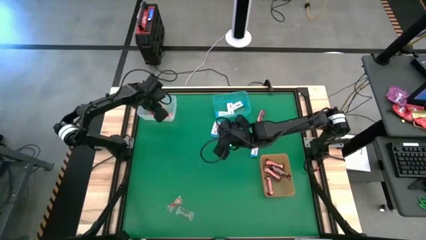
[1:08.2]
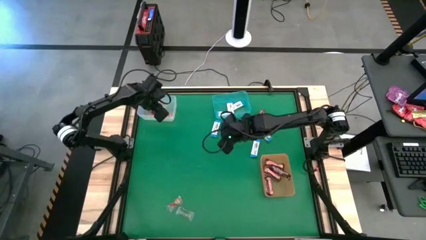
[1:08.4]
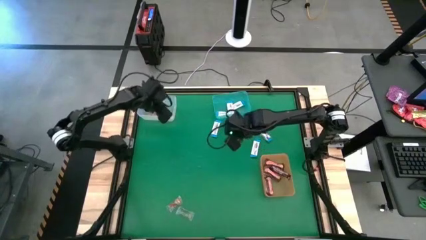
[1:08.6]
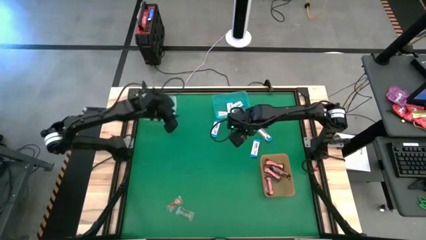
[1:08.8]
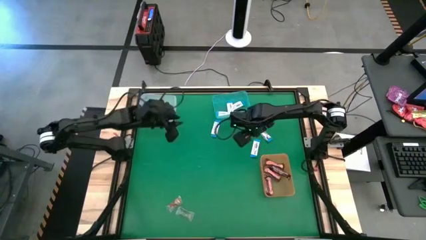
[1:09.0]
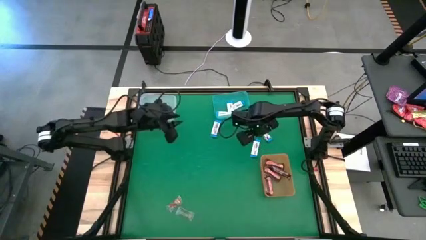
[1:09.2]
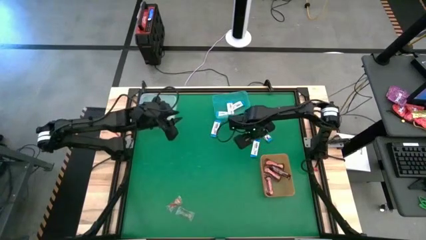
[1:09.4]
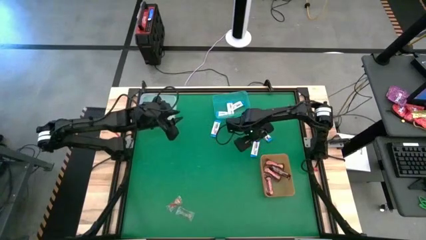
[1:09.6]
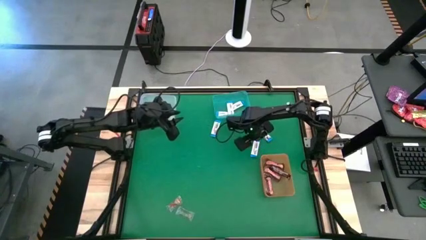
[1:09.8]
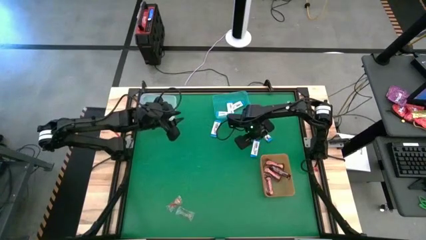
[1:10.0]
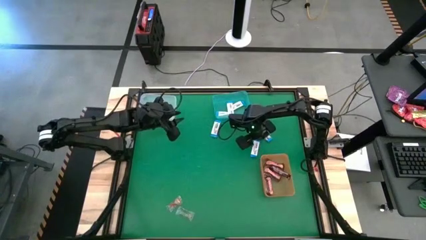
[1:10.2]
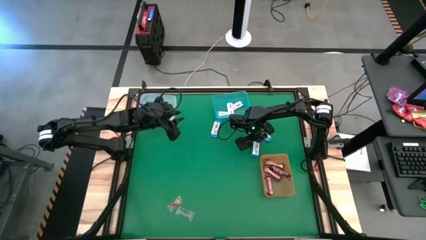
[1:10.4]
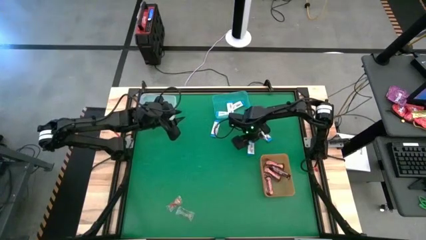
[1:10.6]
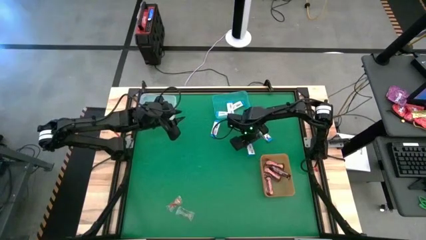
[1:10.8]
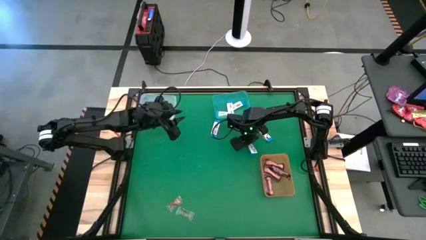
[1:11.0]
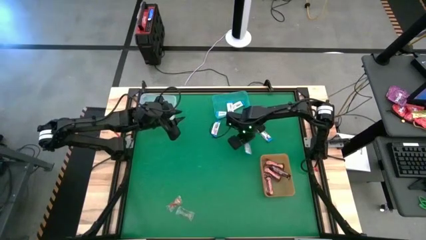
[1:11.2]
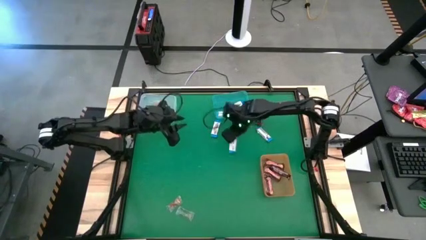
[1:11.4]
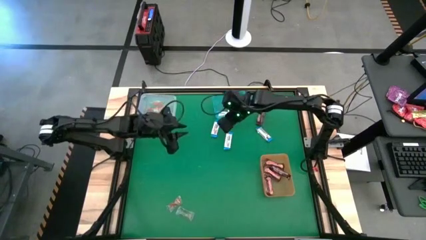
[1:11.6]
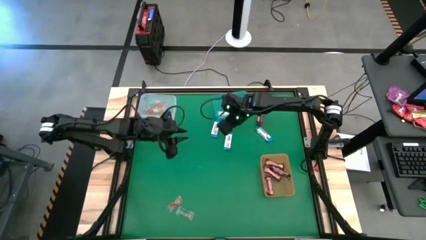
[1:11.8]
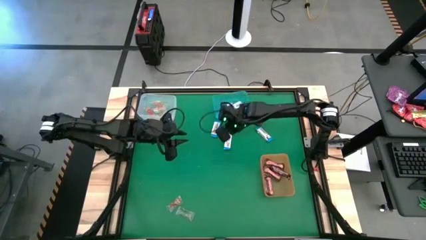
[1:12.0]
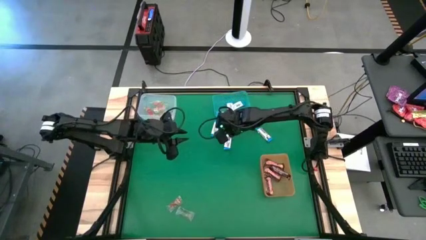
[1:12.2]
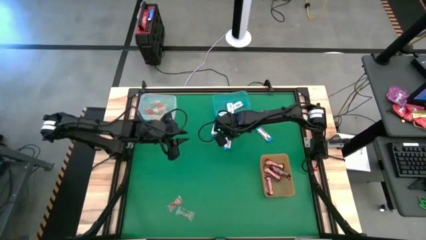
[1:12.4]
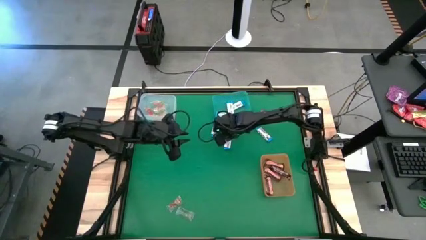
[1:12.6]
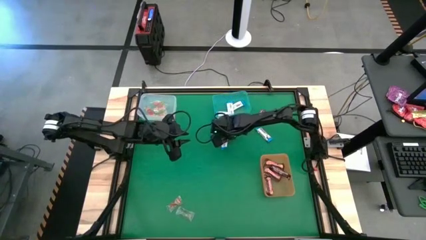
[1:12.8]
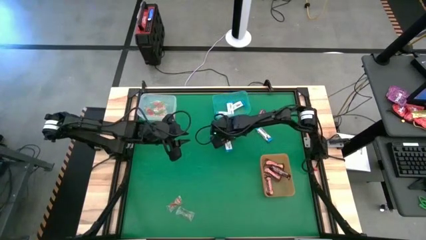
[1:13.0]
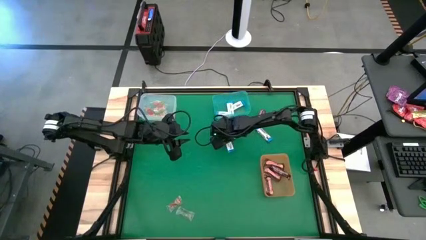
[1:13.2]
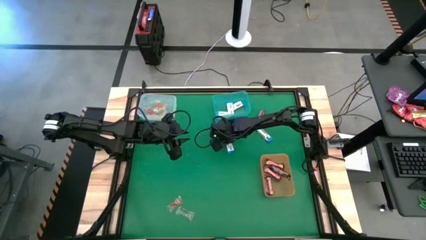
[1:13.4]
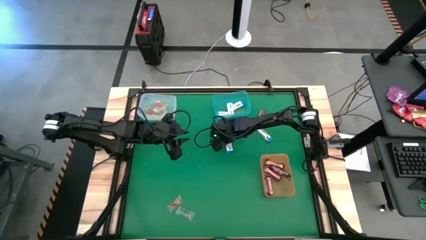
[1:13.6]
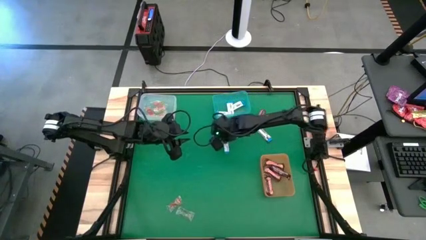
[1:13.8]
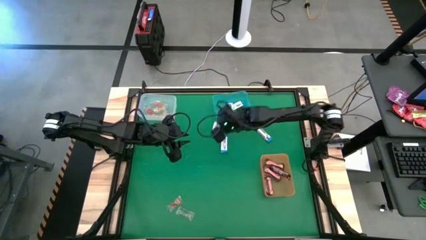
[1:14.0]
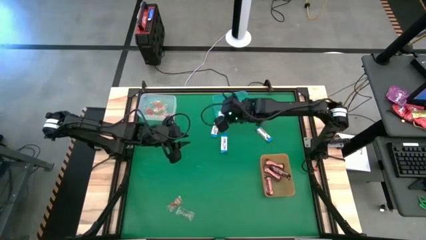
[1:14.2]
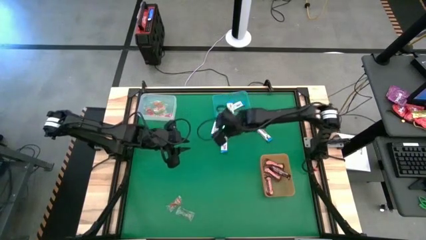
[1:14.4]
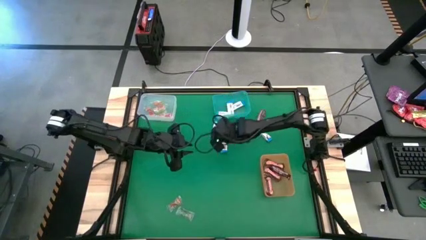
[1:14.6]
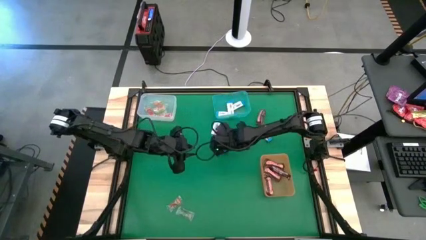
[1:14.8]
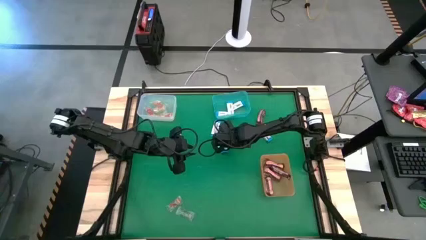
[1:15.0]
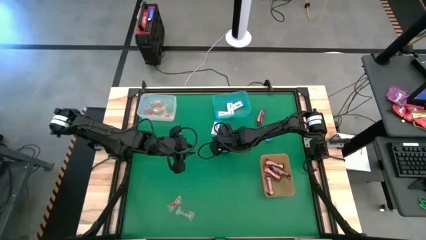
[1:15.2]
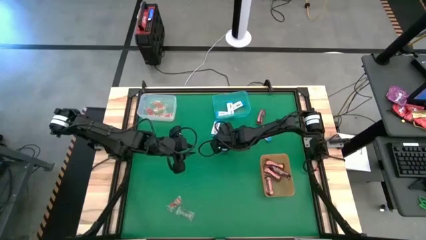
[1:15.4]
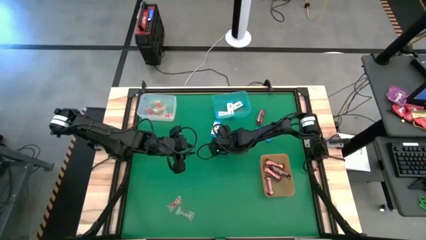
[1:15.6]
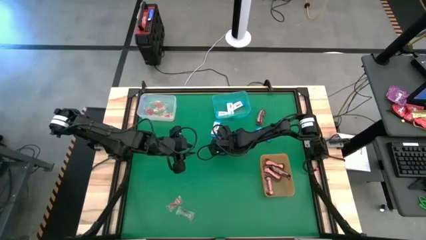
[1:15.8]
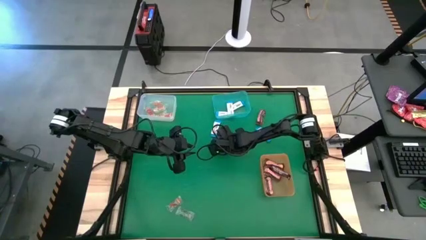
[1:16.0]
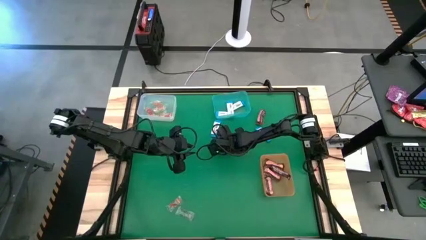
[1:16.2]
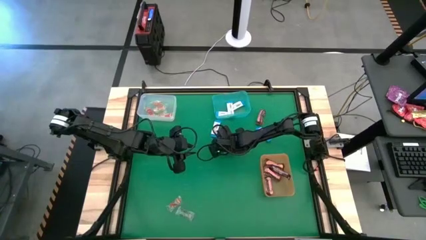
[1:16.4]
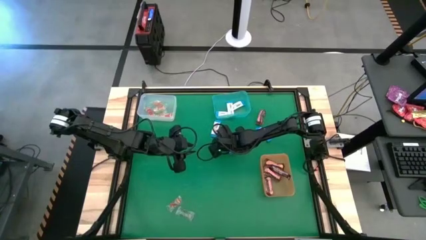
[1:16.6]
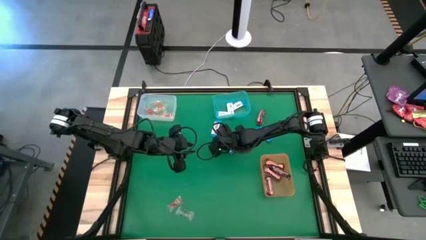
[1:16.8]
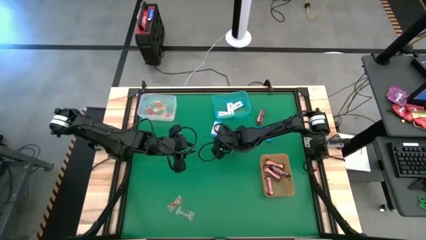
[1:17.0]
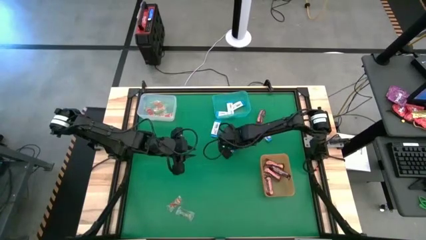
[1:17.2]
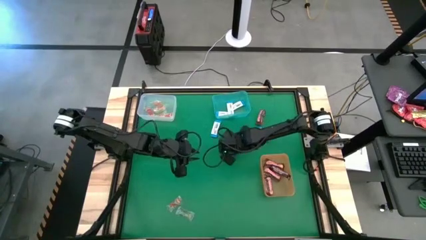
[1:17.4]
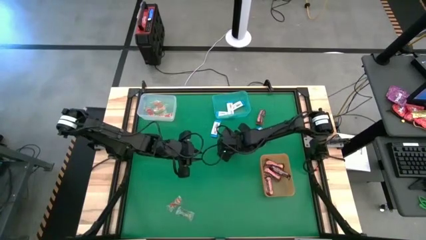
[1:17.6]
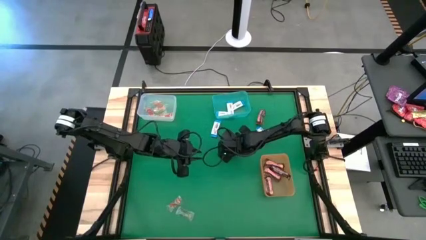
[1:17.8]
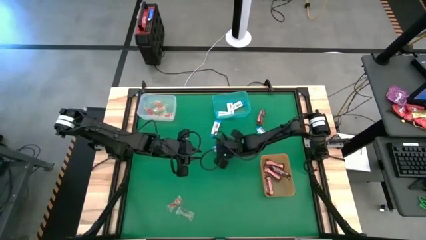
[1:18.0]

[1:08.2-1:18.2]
Task: Sort candy by brand, put in halloween buckets
Put the white chocolate into the light blue bin

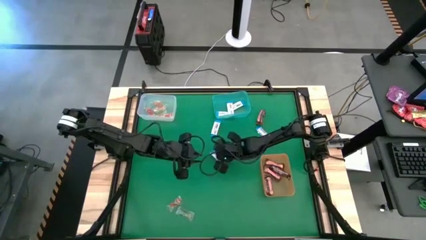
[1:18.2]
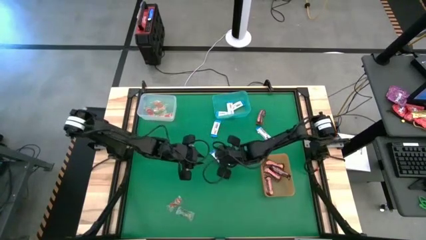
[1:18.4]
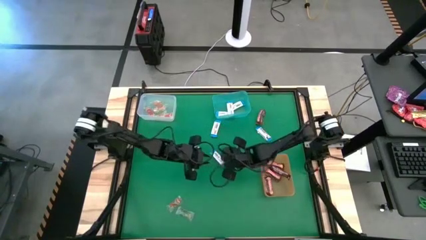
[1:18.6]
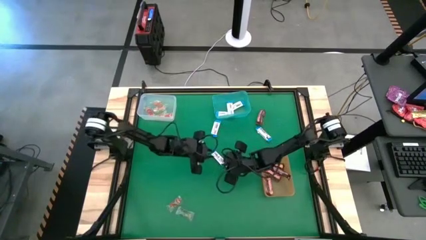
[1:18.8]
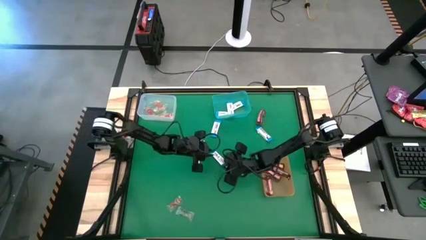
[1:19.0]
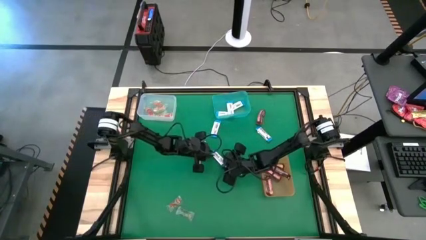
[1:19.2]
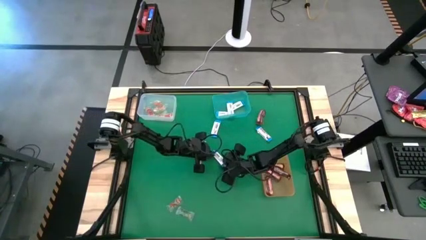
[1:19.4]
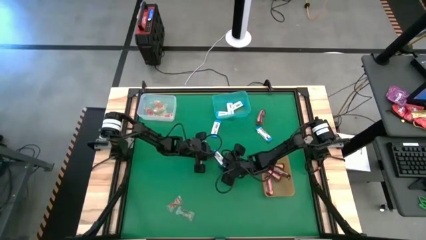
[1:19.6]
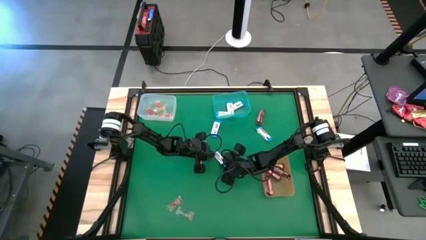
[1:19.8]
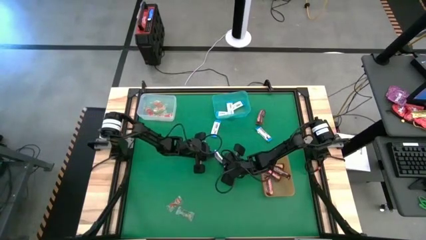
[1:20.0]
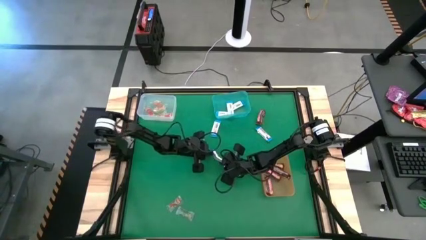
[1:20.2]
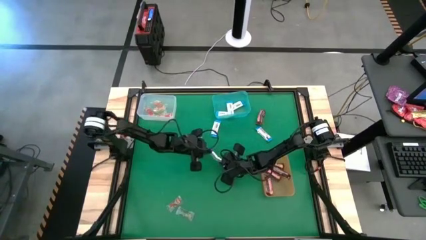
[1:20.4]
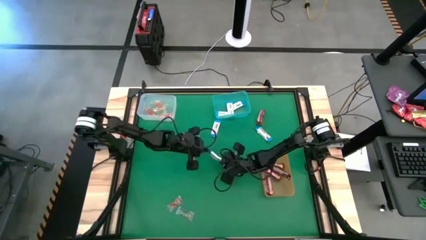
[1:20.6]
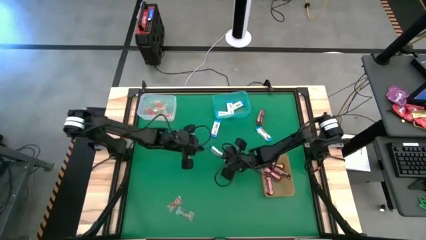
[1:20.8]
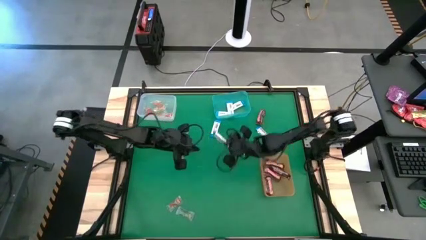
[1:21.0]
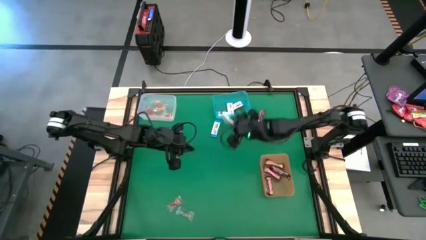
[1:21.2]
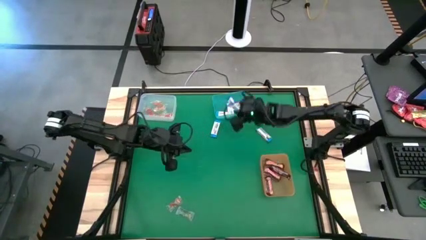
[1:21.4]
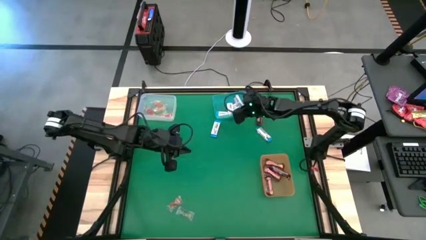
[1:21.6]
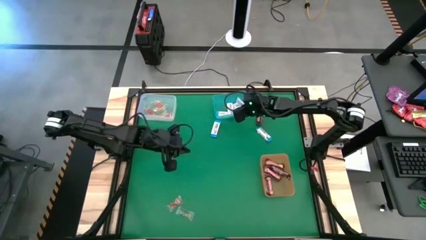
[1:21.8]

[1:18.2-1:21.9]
Put the white chocolate into the light blue bin

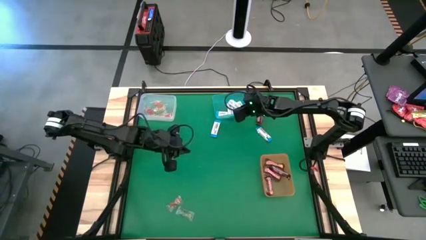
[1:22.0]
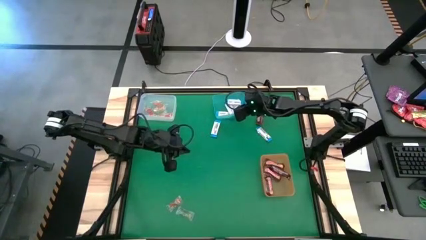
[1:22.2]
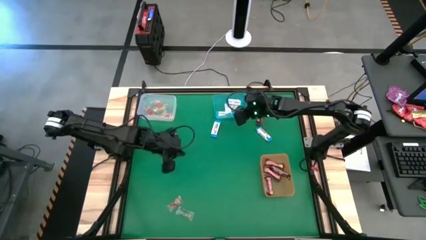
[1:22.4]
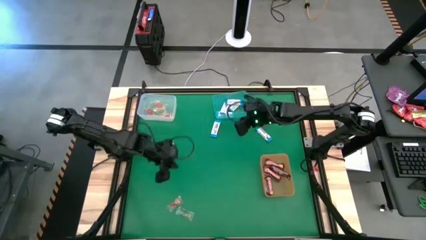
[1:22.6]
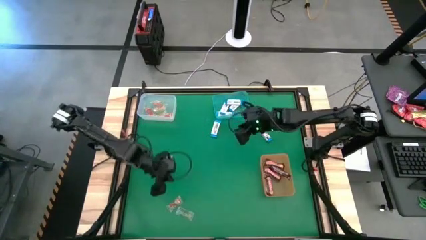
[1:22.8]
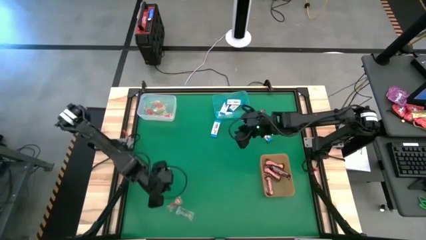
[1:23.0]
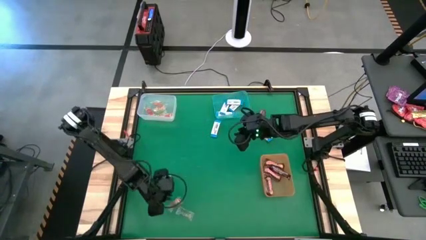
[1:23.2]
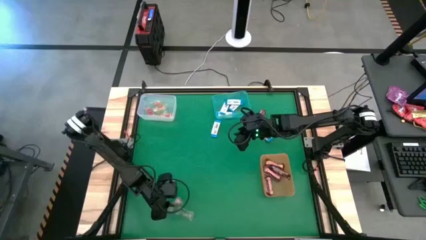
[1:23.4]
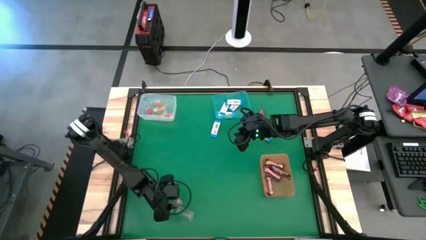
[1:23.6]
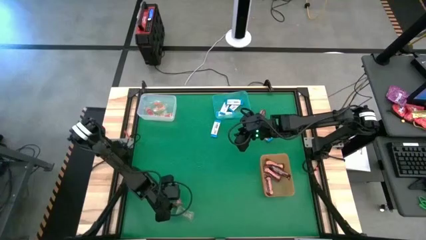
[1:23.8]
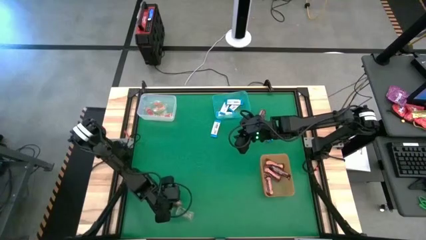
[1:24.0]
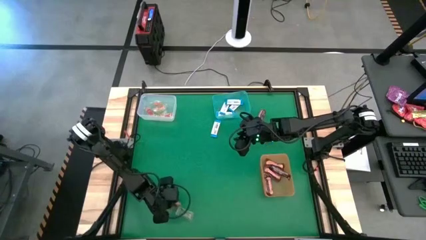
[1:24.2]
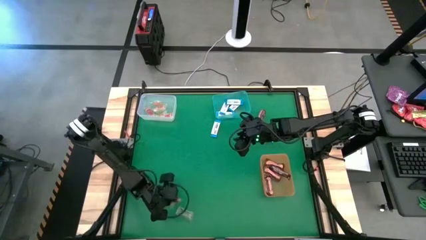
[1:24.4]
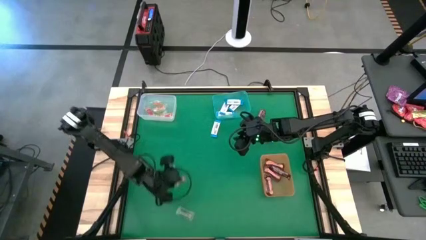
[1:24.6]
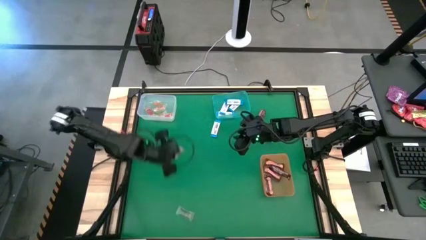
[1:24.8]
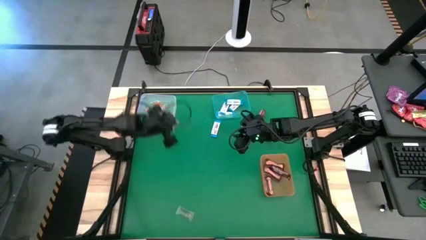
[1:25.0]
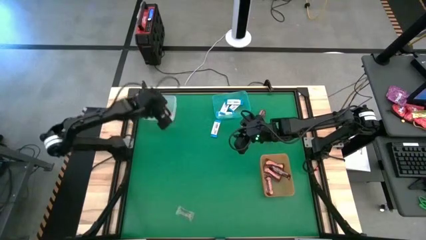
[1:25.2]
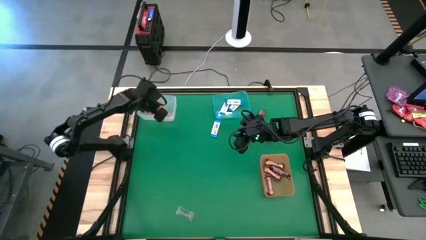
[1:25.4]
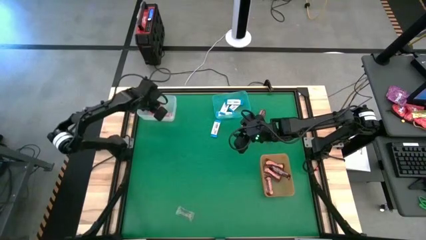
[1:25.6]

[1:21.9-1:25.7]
Put the red gummy into the white bin
